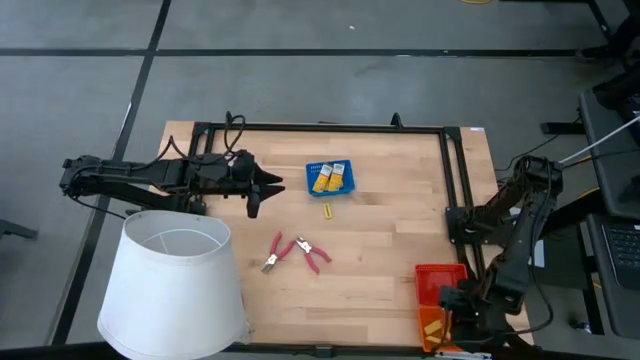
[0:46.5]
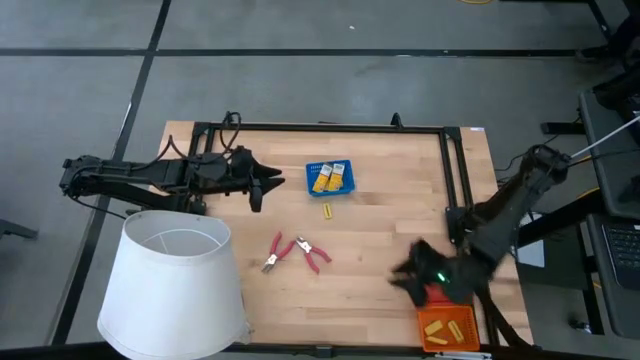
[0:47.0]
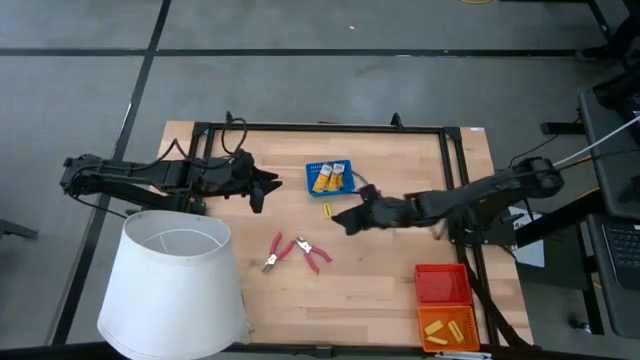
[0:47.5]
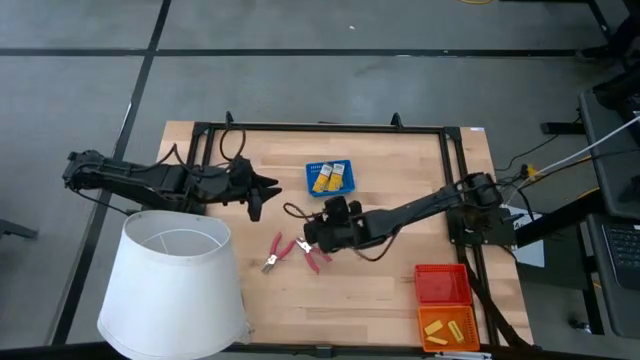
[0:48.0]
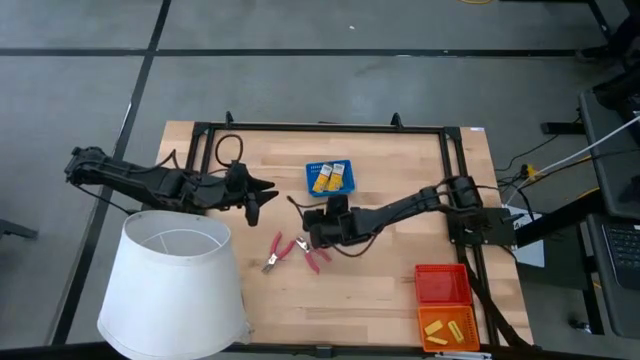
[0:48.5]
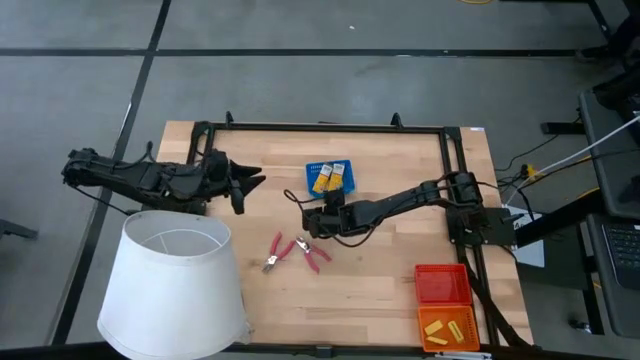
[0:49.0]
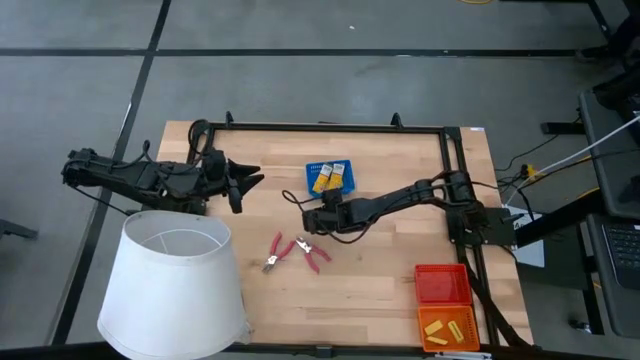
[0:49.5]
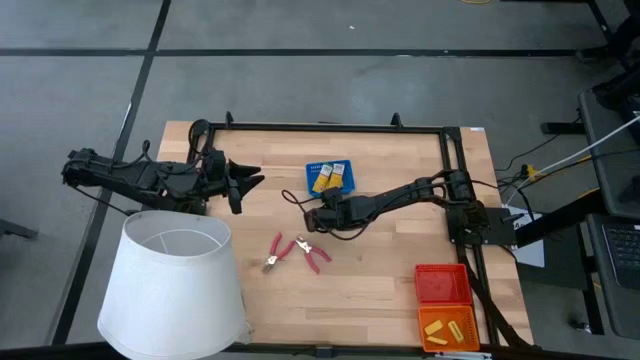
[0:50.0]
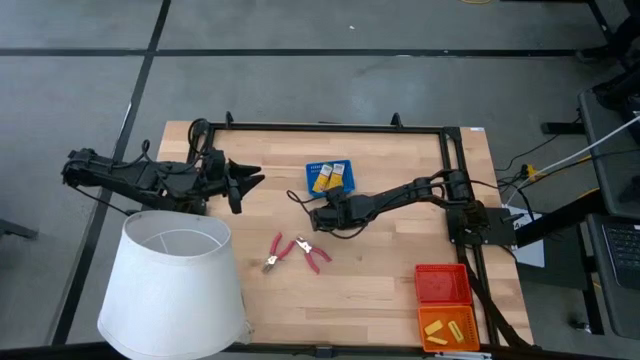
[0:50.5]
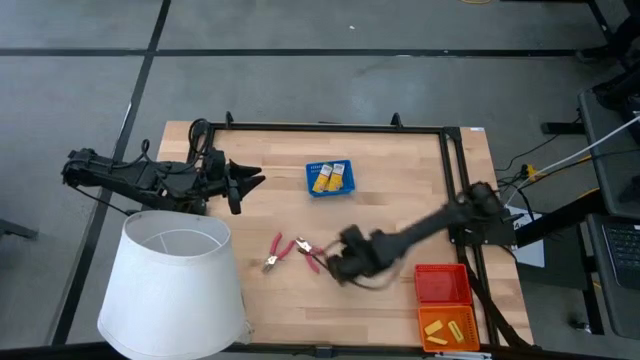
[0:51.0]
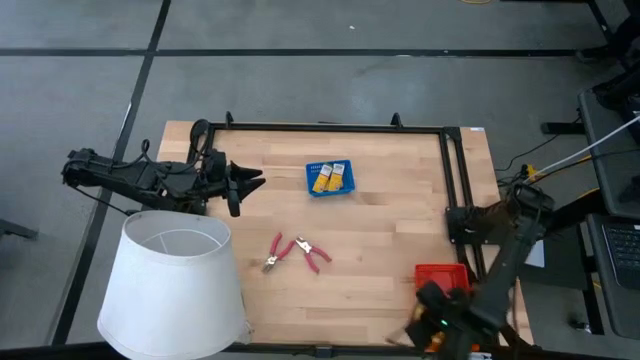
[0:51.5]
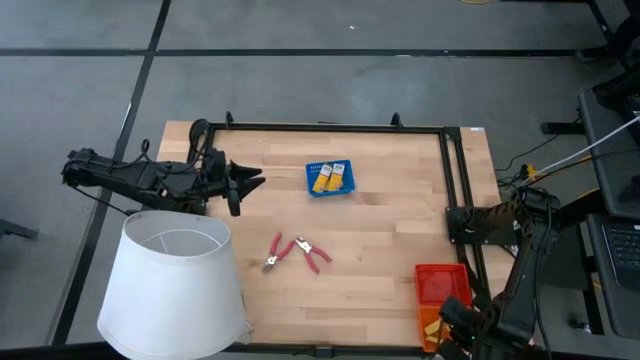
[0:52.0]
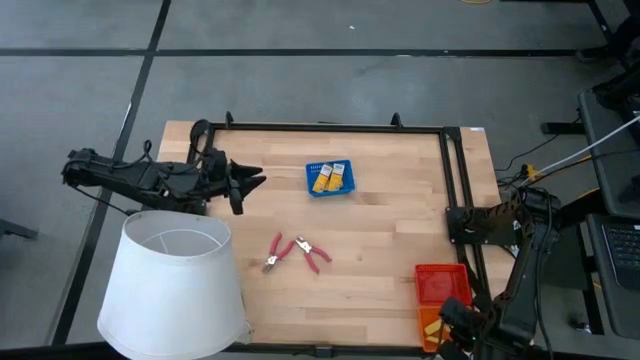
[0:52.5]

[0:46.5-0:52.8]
Task: Pick & Place School Supplies
Put the yellow eraser into the orange bin

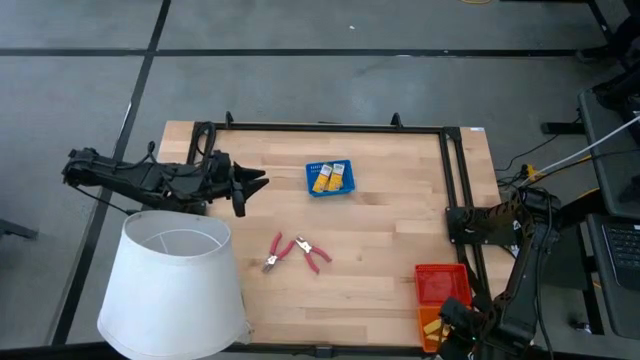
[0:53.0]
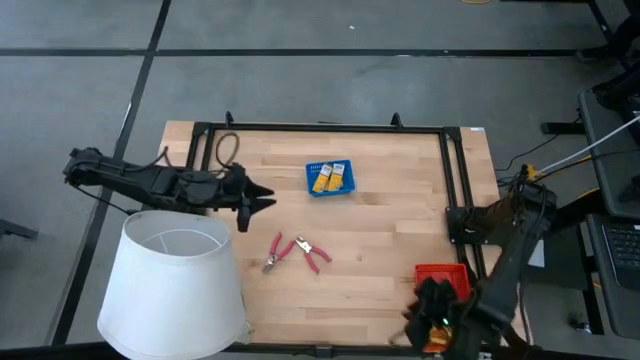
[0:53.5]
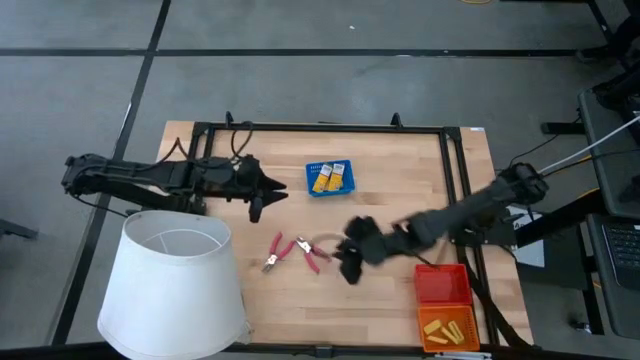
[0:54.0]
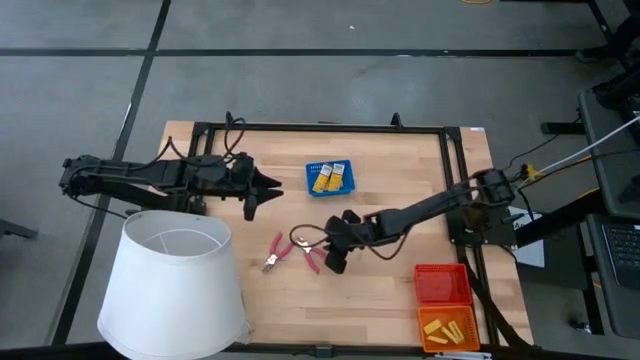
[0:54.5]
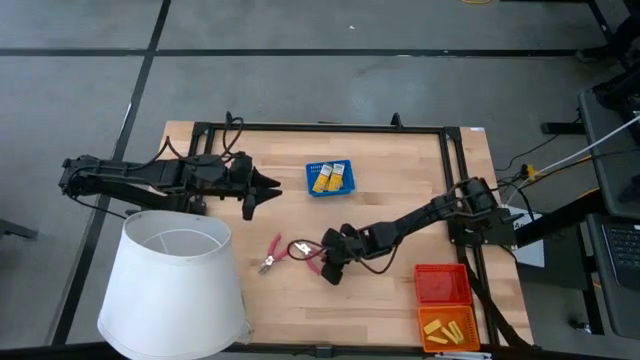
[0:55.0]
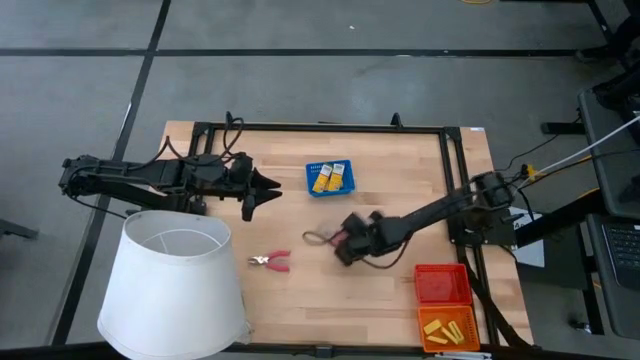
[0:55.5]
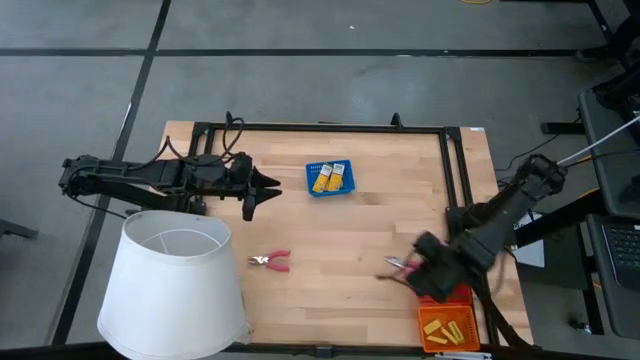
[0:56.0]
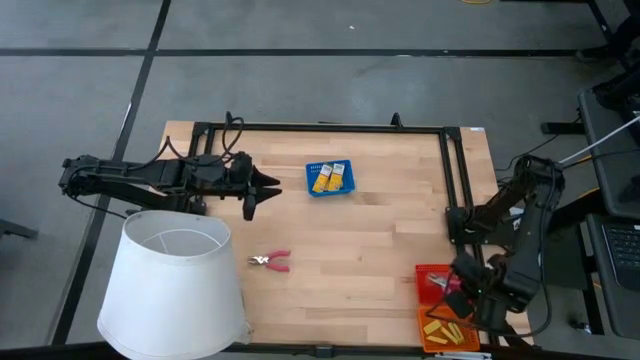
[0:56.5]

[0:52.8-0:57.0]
Put the pink hole puncher into the red bin

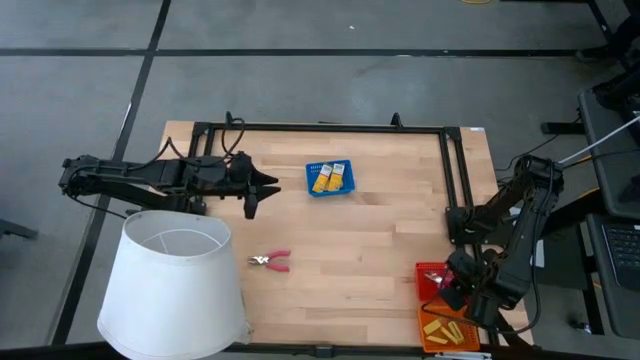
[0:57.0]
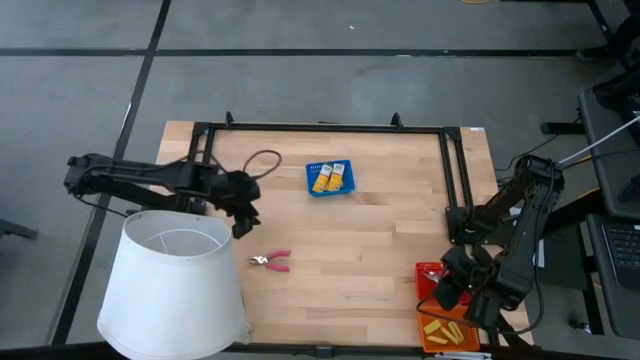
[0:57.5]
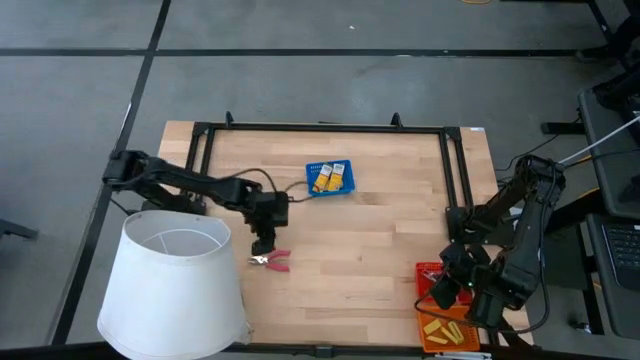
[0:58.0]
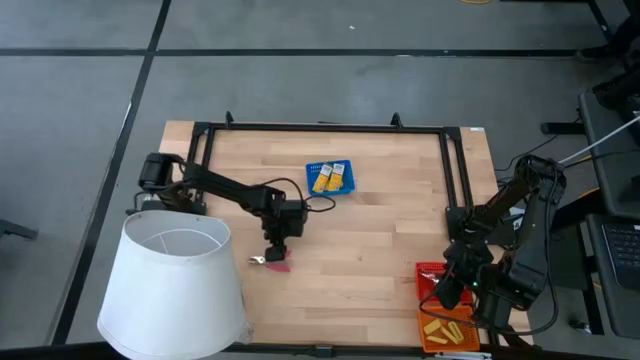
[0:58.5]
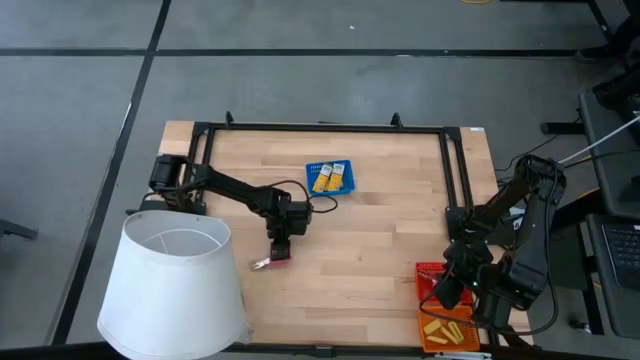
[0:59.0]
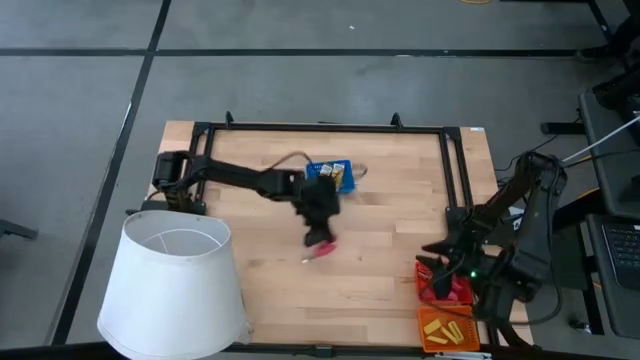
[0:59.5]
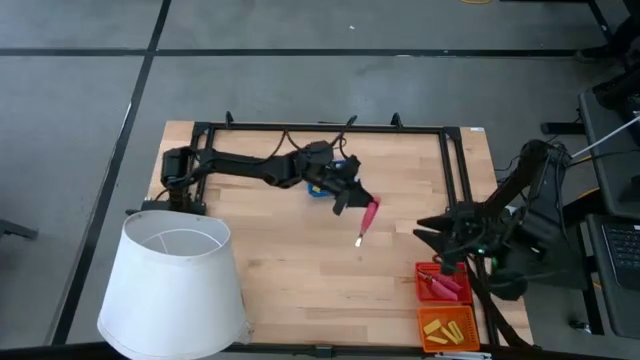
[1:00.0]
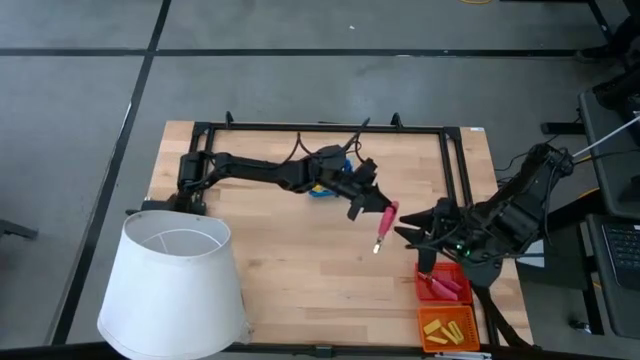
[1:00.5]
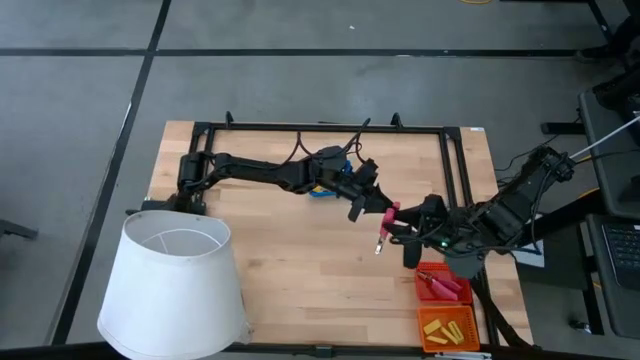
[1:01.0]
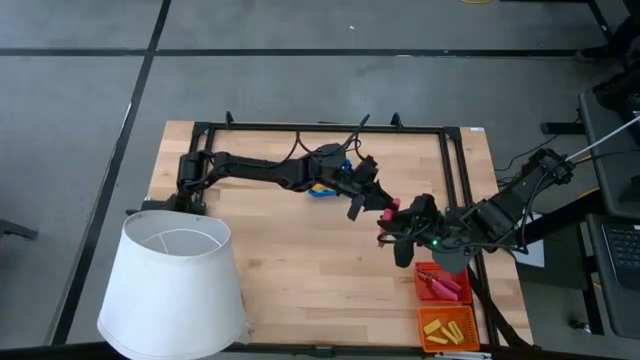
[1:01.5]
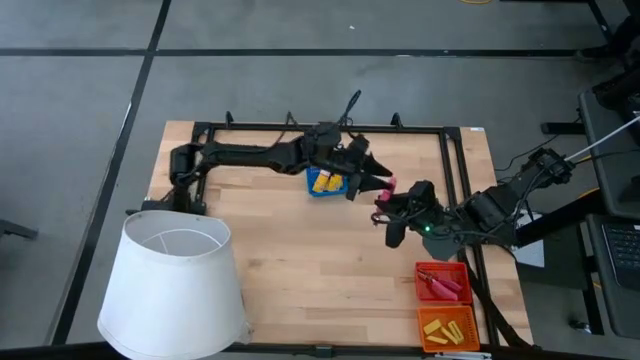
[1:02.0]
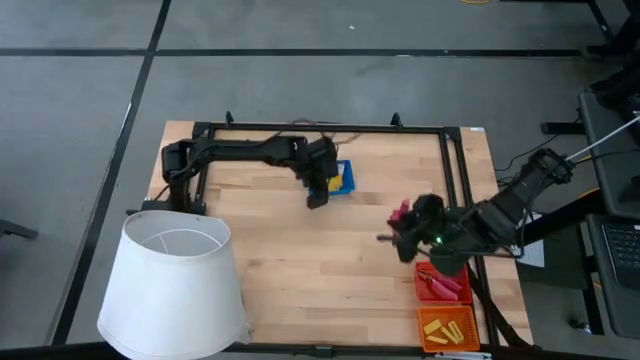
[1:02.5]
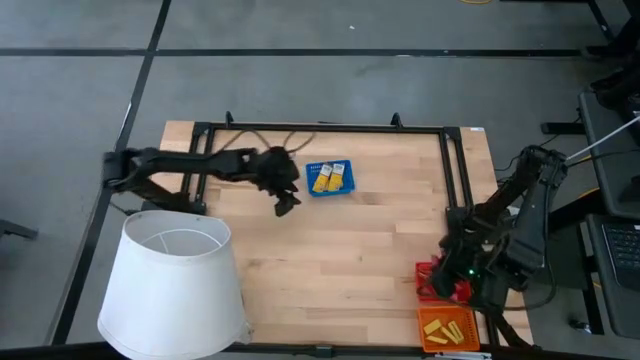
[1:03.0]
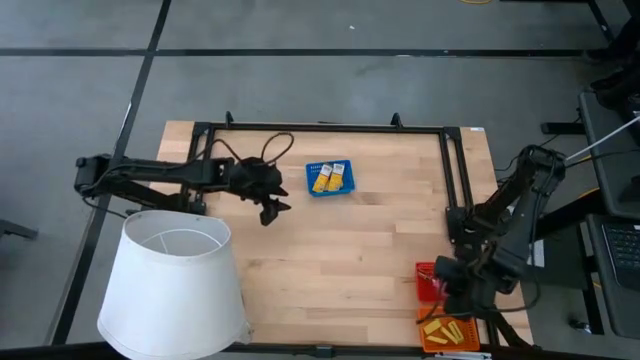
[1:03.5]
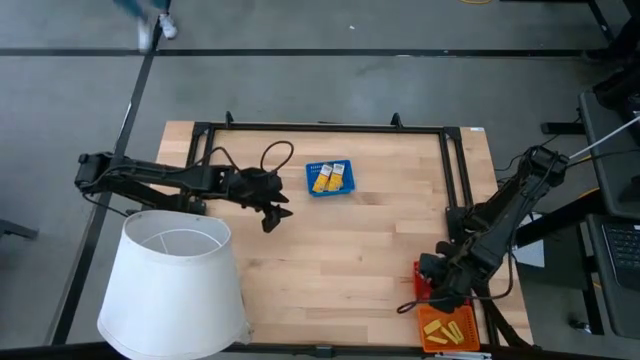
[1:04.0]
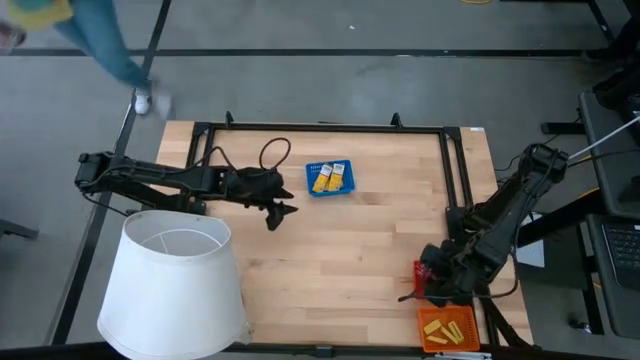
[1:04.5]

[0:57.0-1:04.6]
Put the pink hole puncher into the red bin

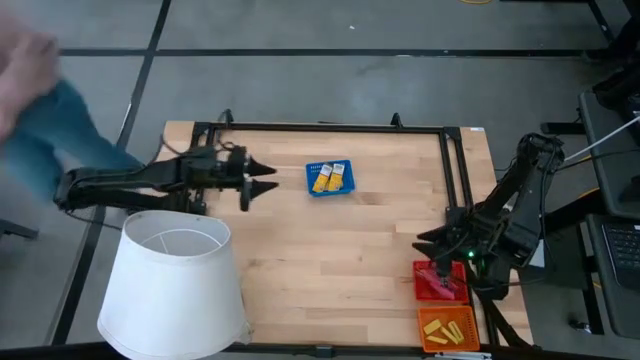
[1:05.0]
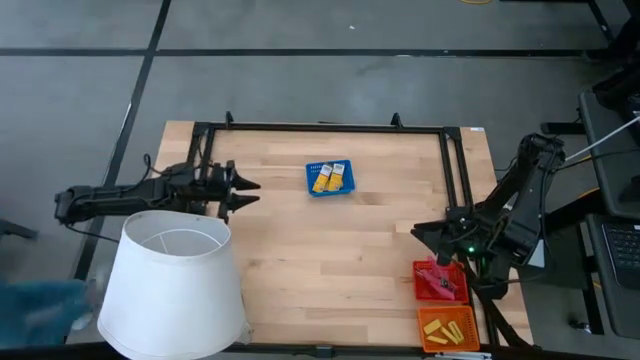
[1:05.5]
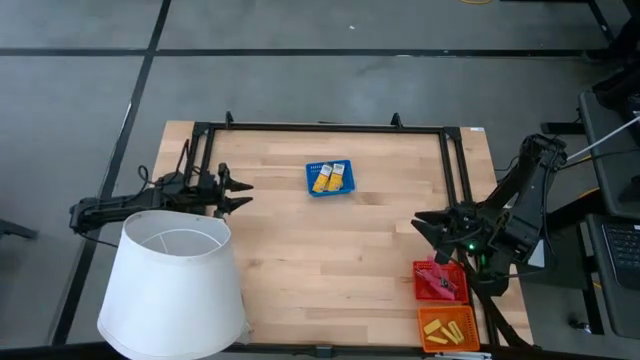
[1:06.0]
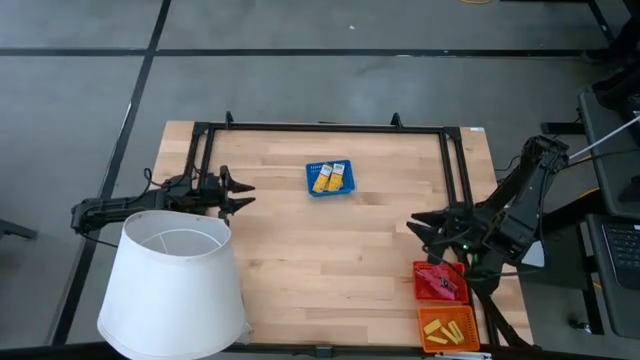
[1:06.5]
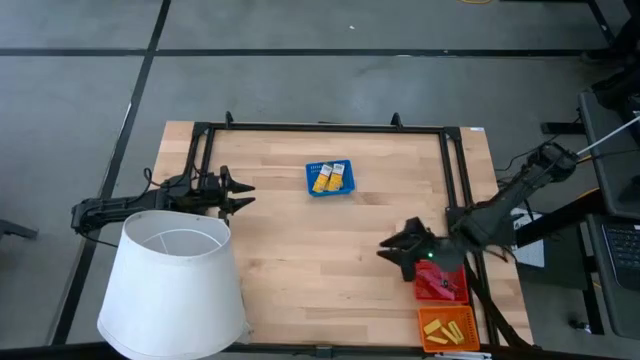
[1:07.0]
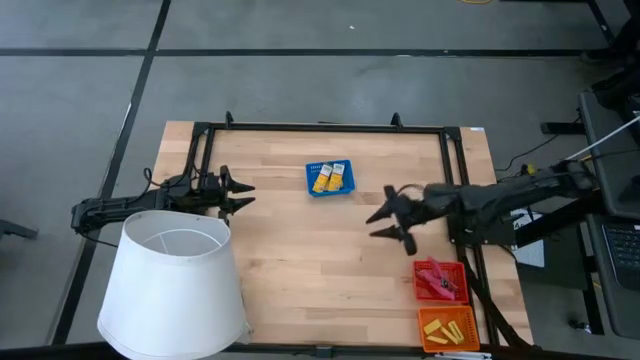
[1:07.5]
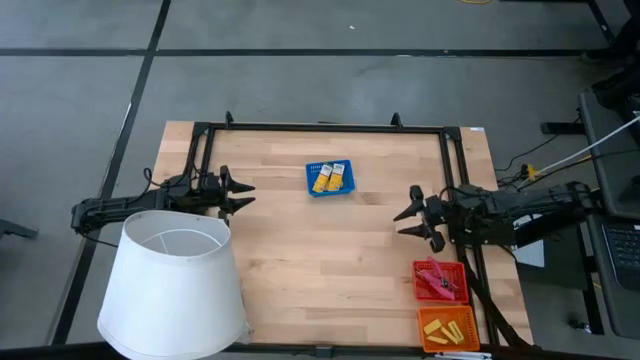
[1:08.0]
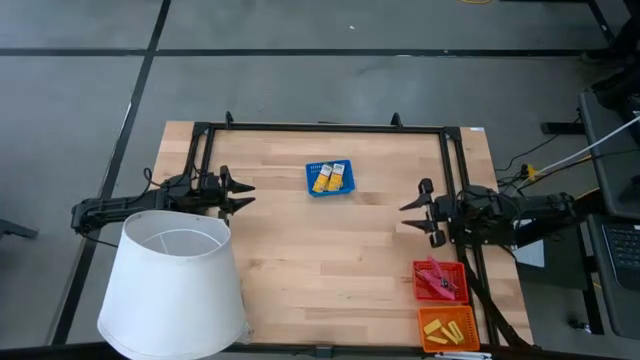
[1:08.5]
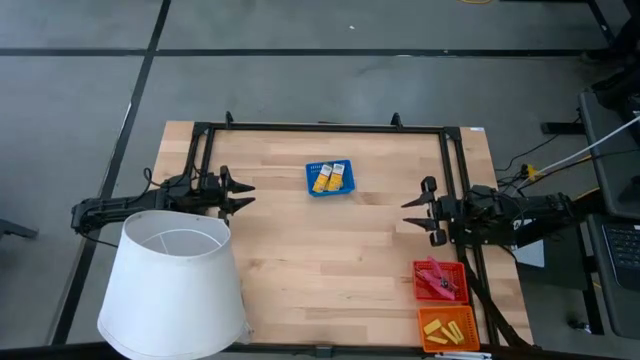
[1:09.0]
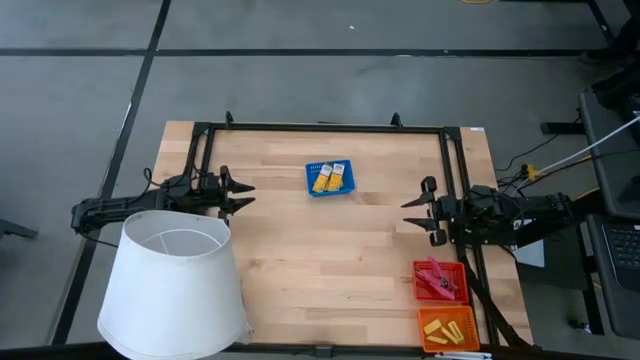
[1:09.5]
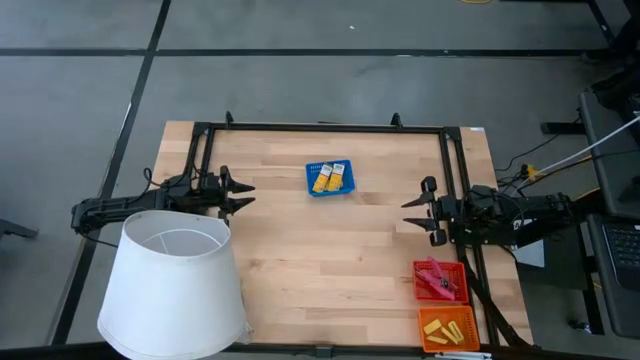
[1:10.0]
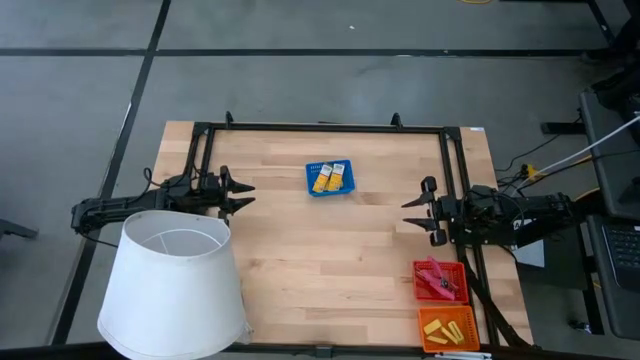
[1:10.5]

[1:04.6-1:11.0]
Return to Home Position
